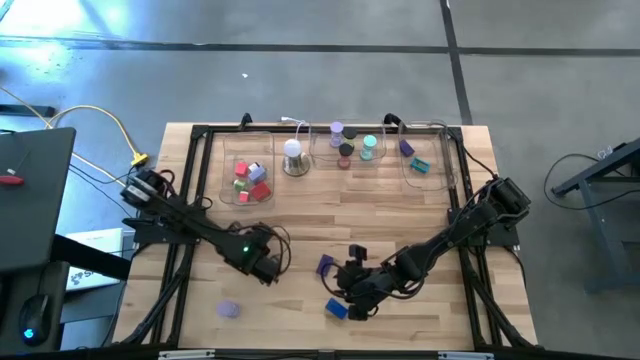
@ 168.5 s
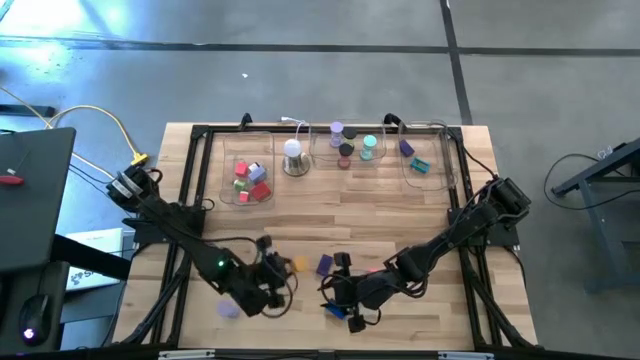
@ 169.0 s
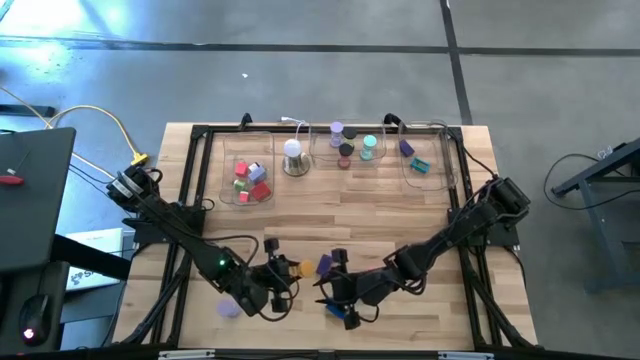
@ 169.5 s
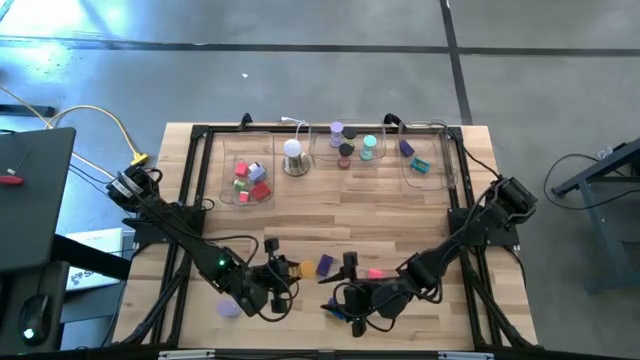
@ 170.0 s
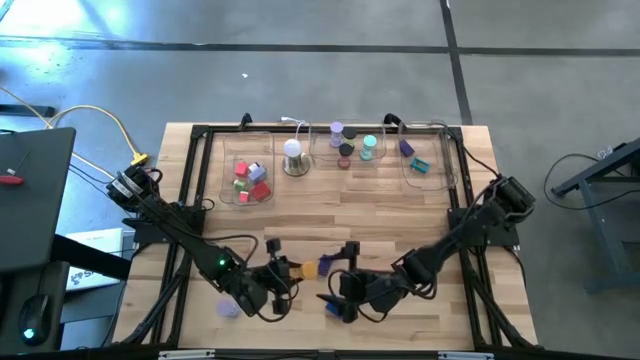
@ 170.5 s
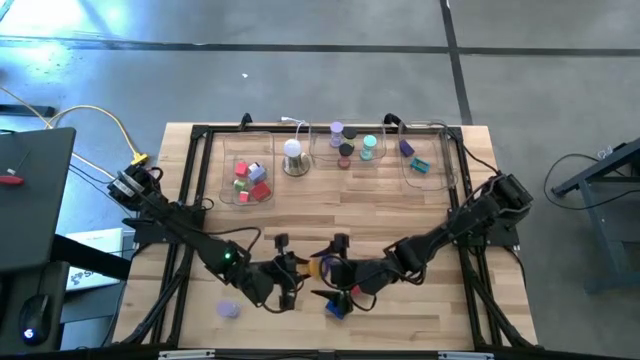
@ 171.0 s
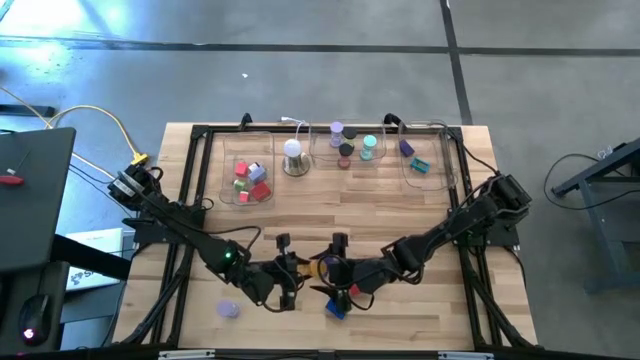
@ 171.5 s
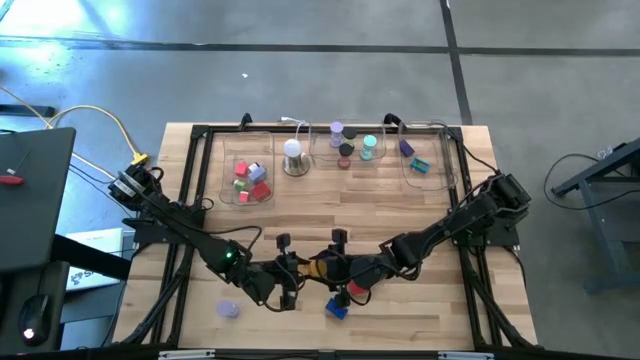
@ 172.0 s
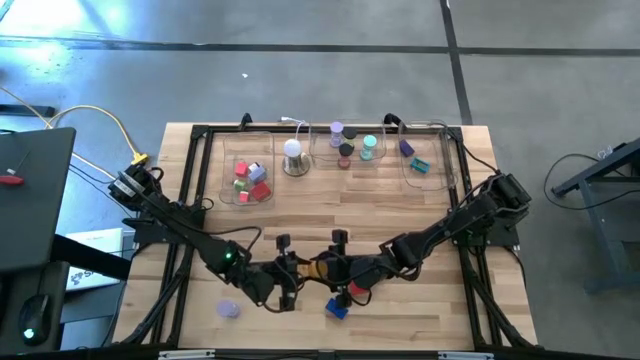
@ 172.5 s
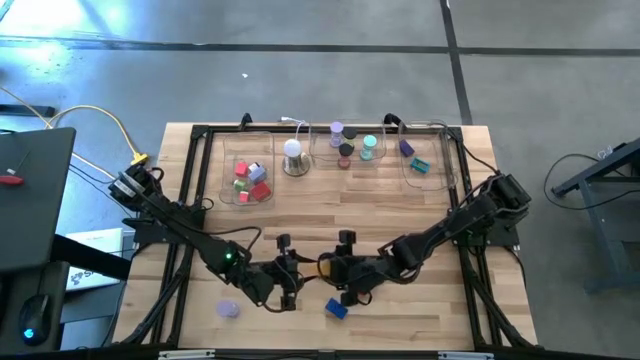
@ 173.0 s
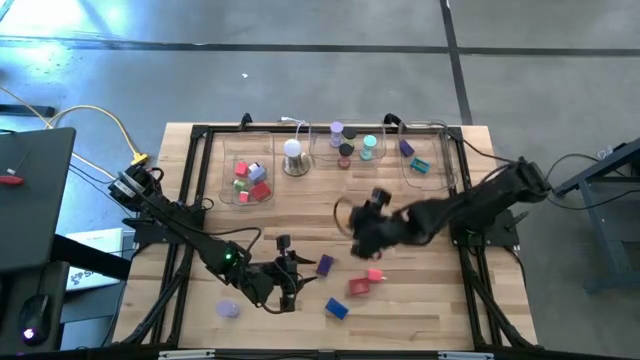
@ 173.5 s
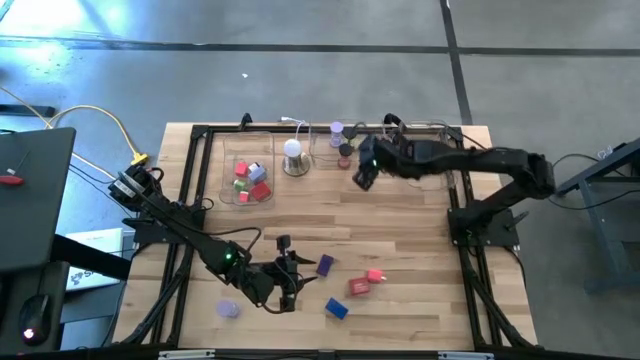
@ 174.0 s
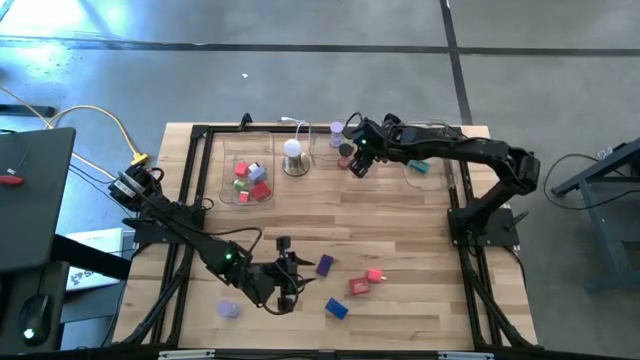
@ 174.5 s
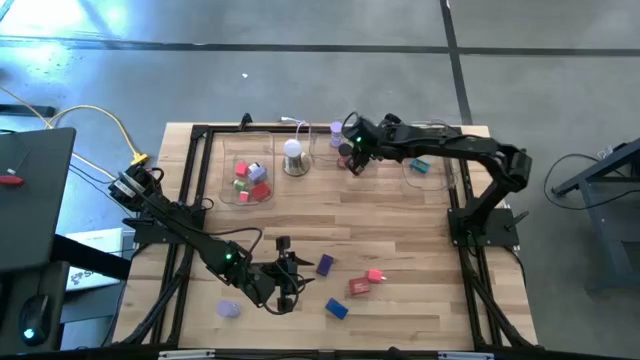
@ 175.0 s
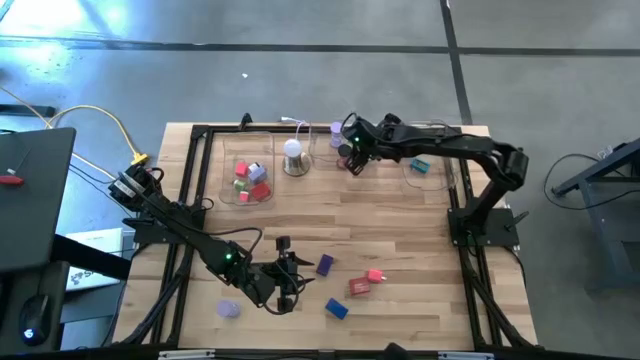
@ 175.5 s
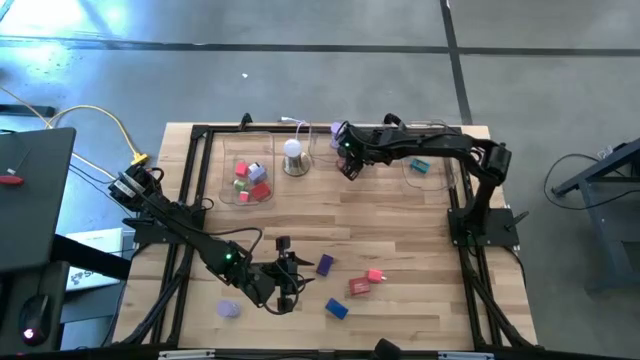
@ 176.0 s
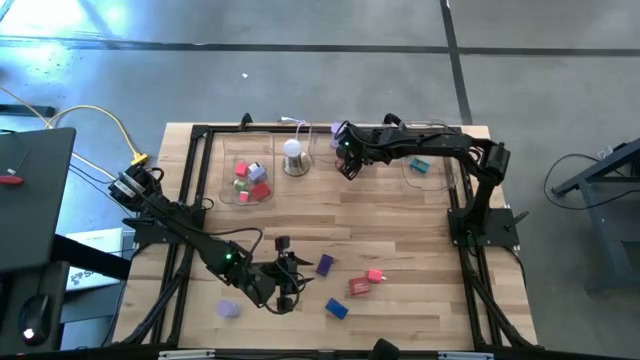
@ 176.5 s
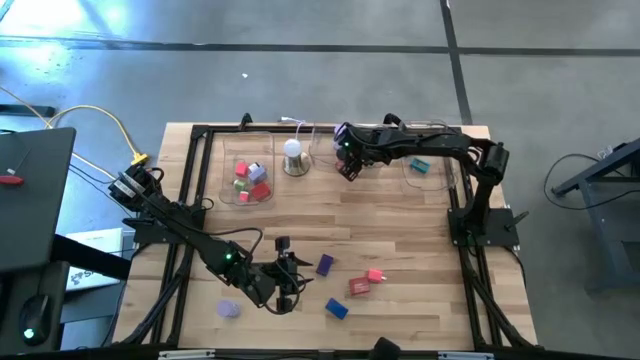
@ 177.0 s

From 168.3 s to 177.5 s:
Task: Pick & Place Office items
Put the yellow hourglass into the middle transparent bin

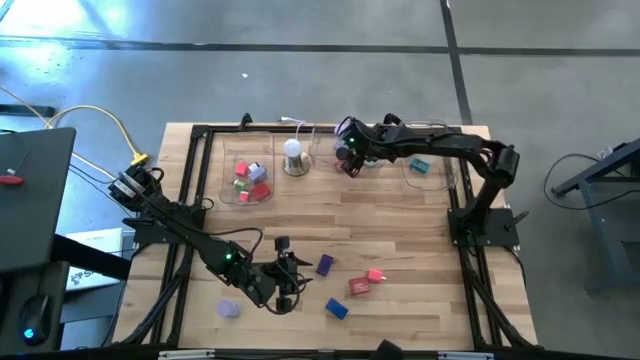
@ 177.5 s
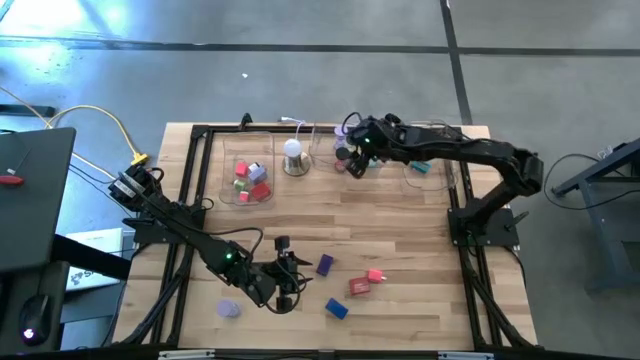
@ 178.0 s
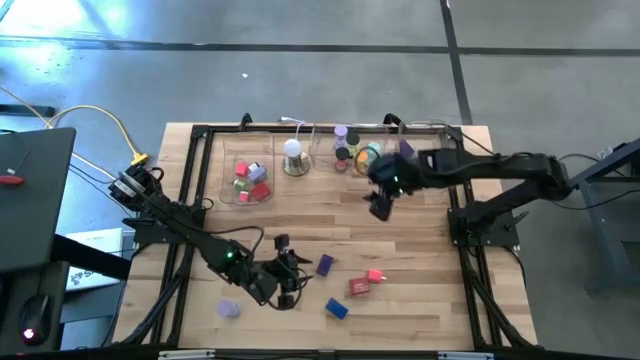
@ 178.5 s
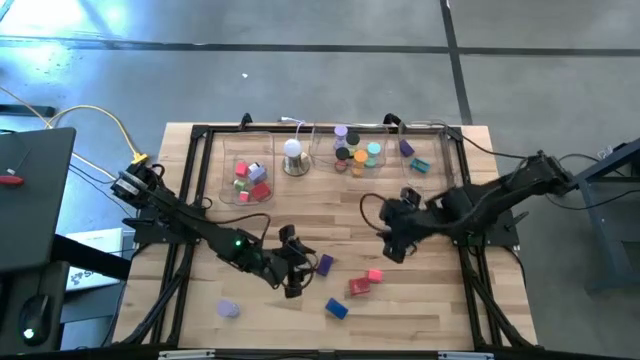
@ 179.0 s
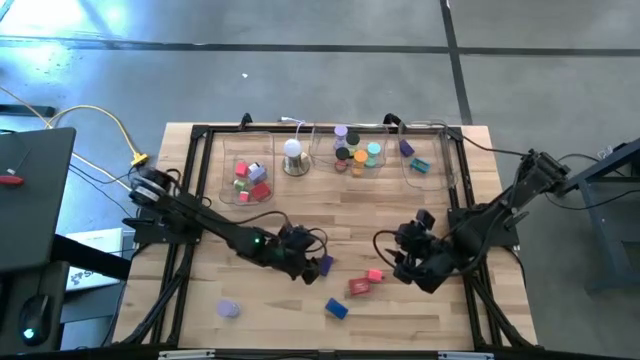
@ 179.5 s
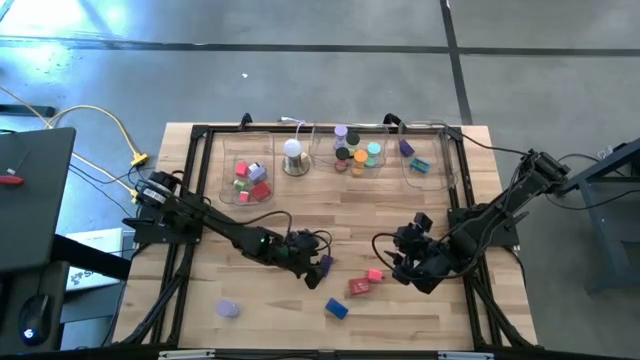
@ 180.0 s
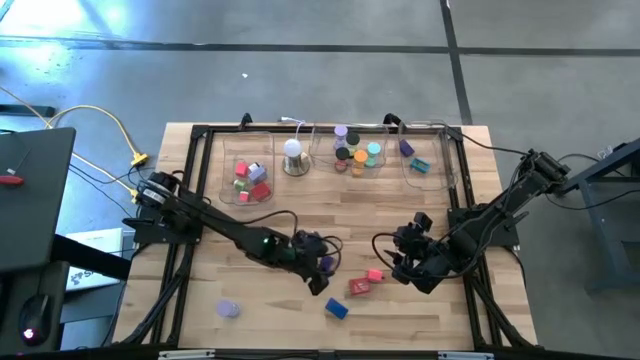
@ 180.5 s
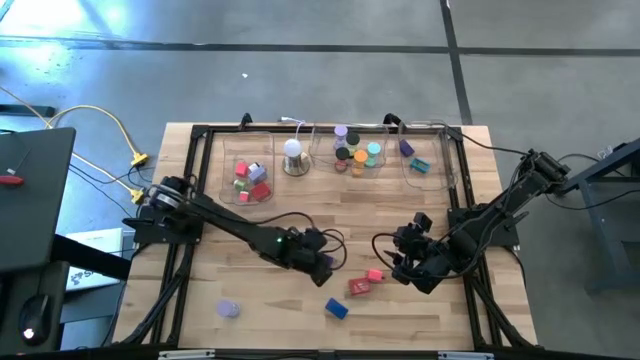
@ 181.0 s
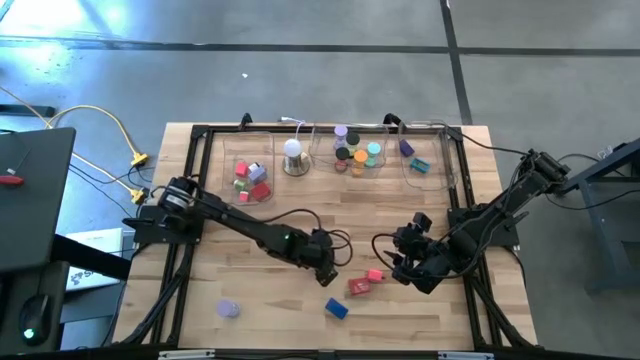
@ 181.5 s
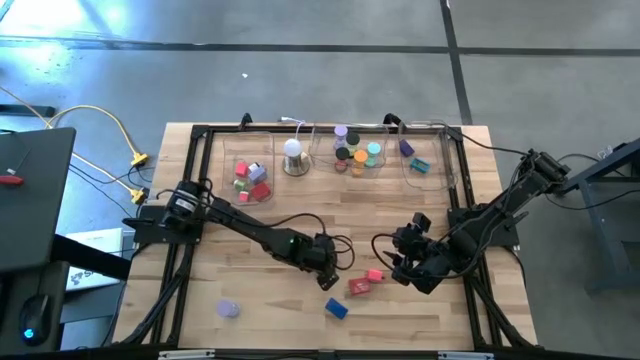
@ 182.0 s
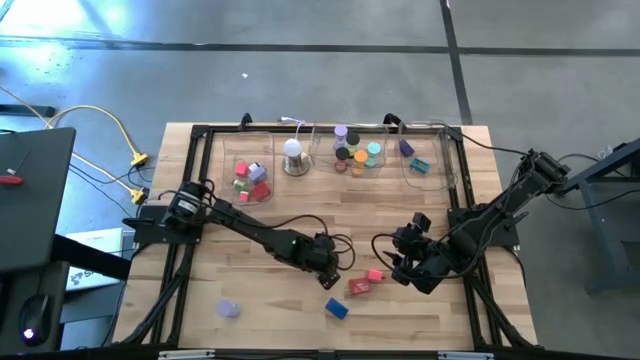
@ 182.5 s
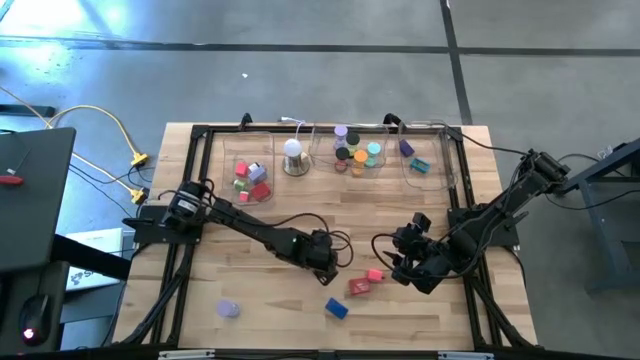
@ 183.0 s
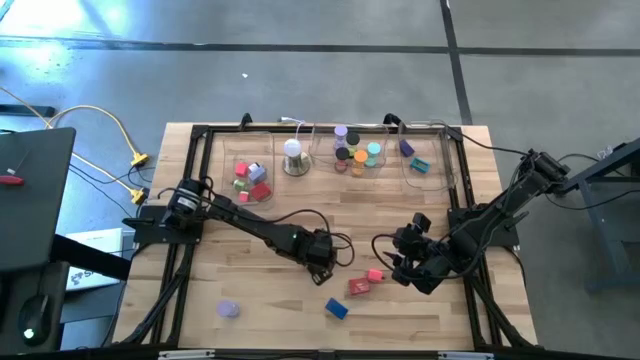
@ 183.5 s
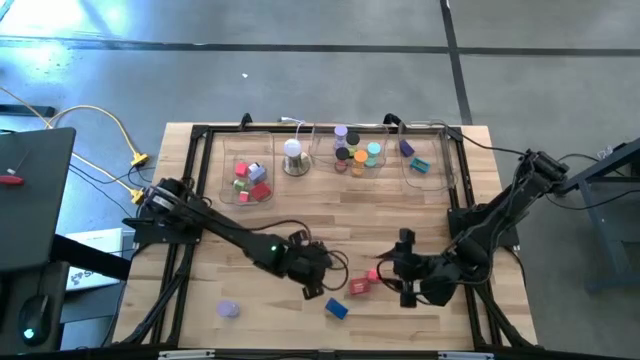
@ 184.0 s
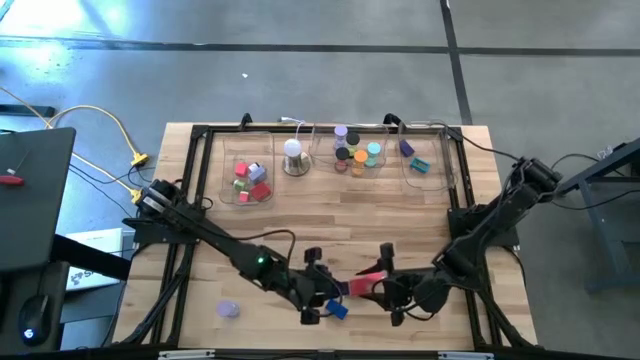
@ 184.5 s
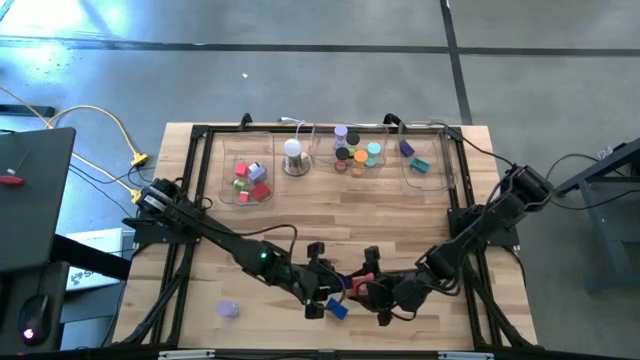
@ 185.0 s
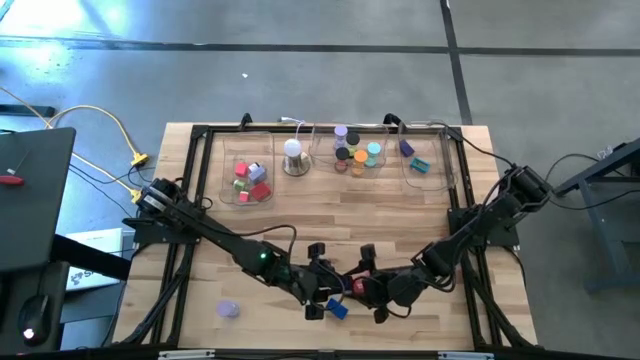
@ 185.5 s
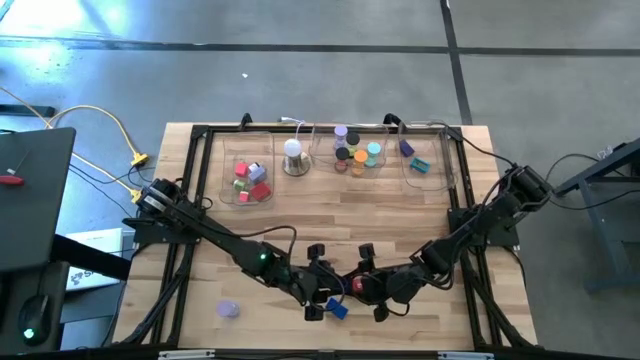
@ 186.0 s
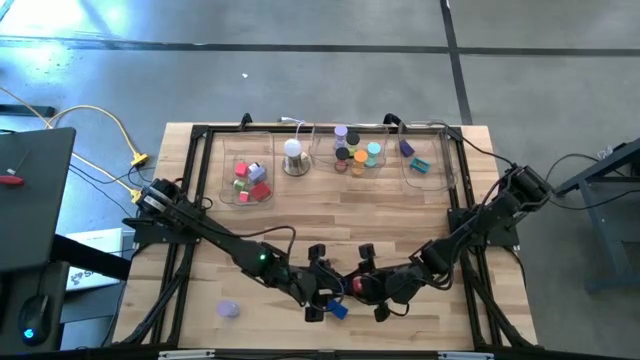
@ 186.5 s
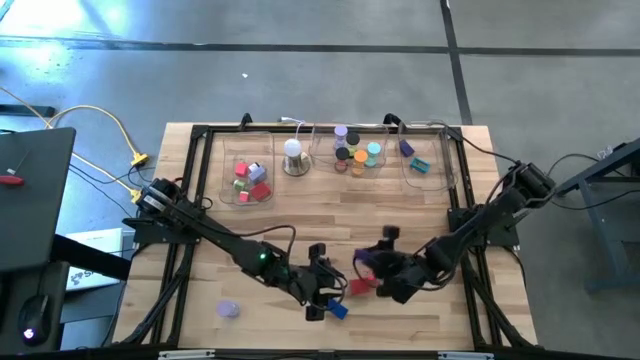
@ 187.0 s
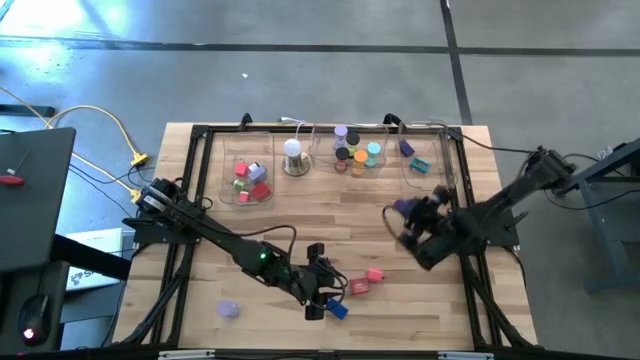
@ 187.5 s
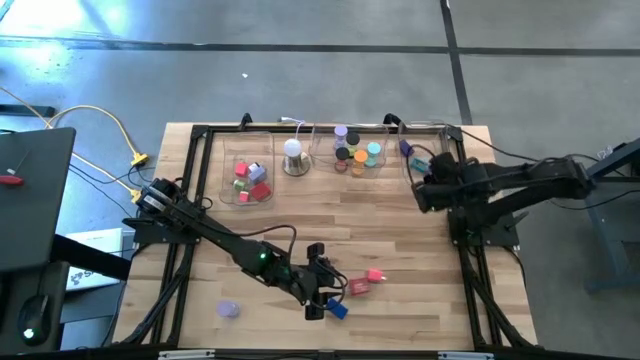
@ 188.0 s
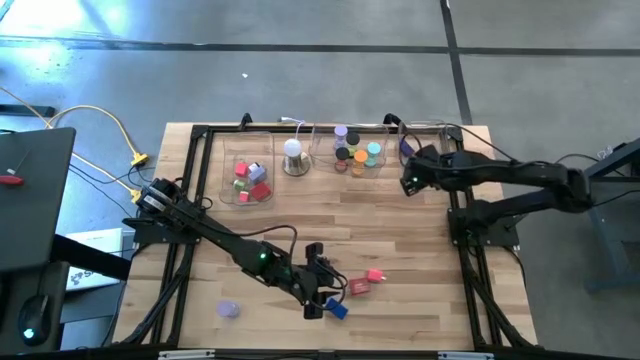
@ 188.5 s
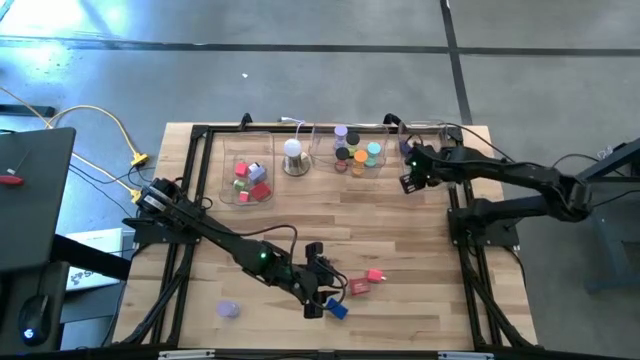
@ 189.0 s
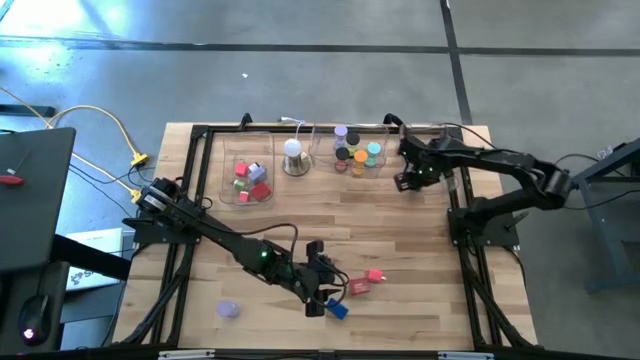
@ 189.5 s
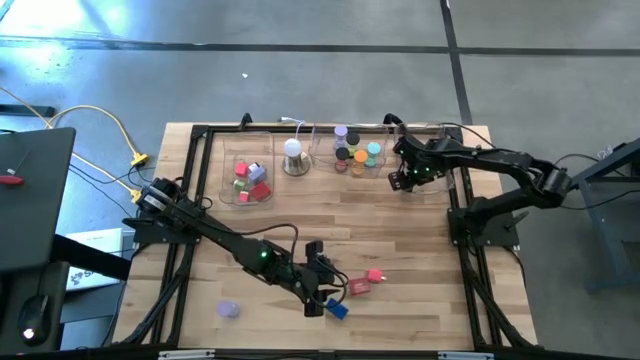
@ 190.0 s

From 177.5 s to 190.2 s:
Put the left blue digital clock into the right transparent bin
